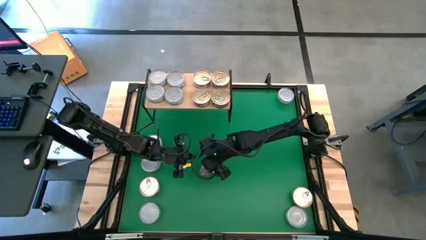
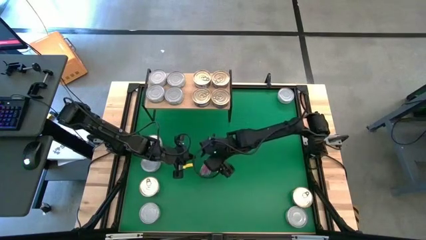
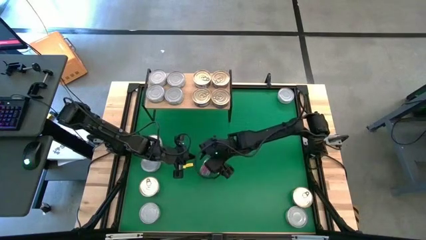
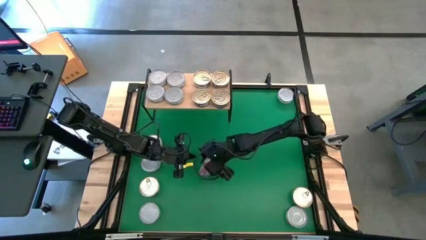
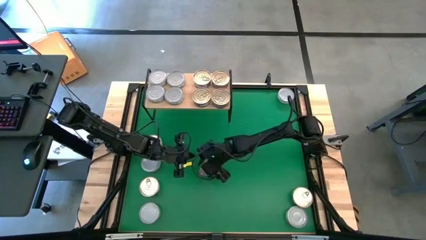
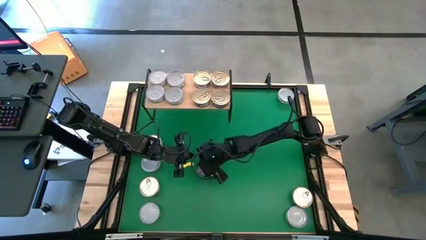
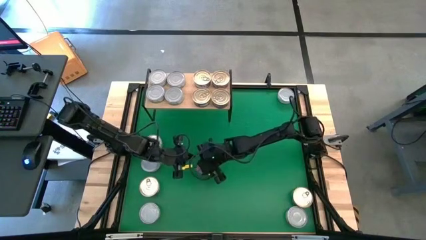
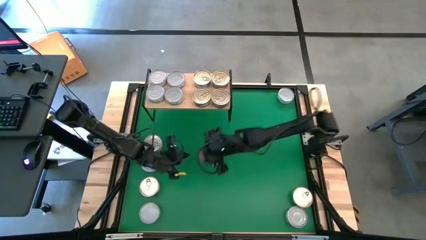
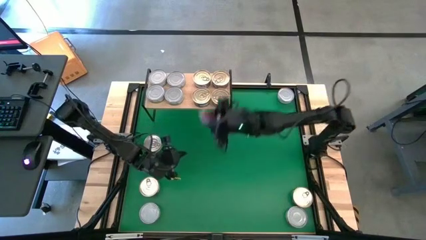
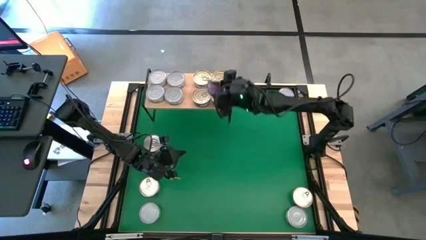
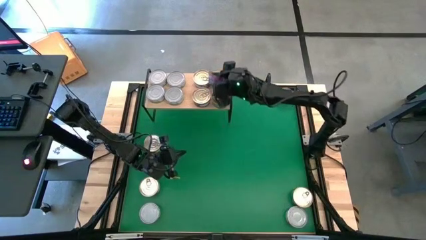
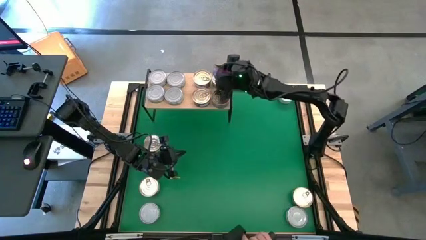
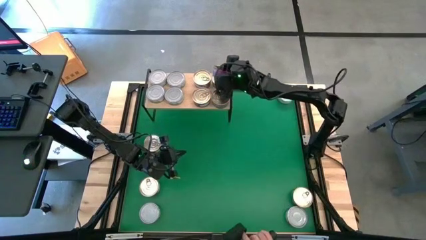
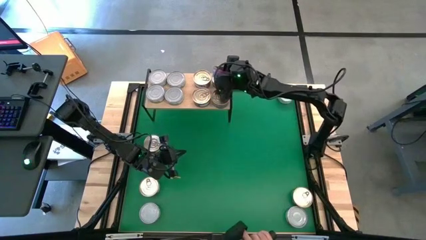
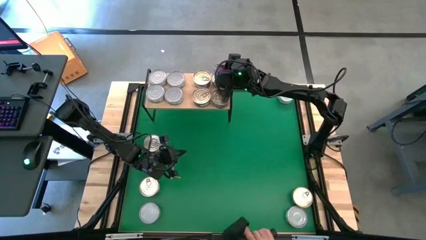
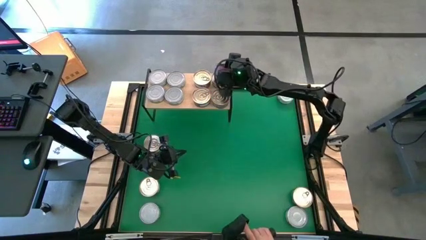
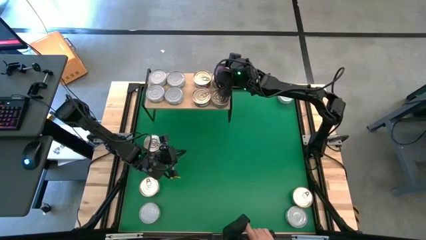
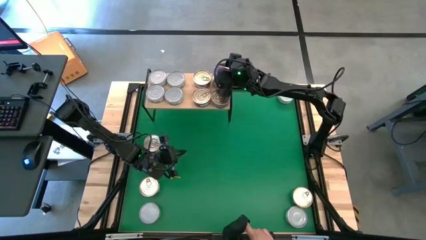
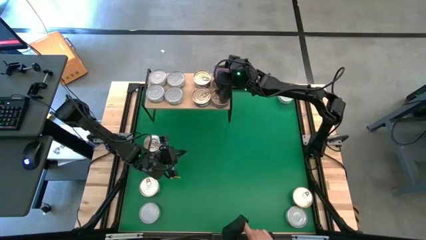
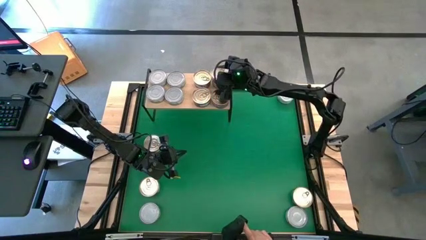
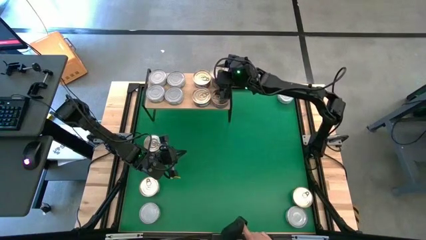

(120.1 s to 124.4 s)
Task: Stack canned seafood by type on shelf
Stack the blue-pink tuna can on top of the other blue-pink tuna can on the shelf

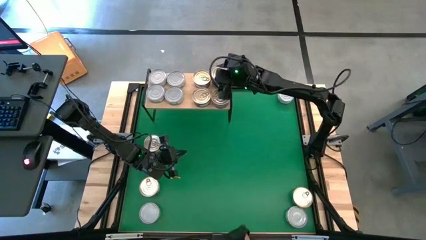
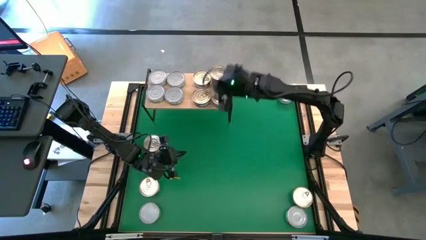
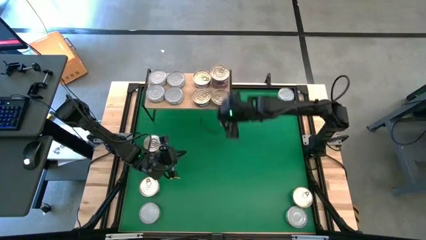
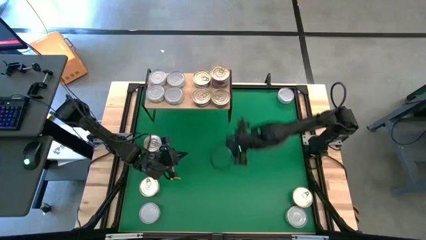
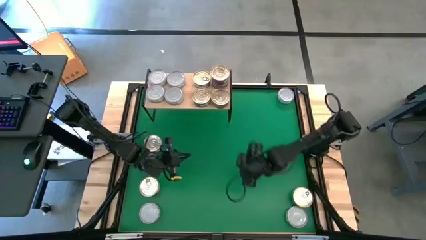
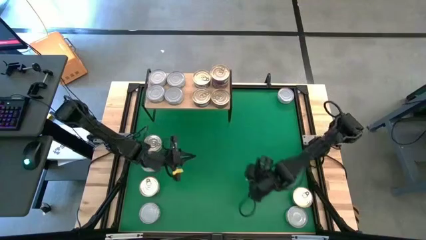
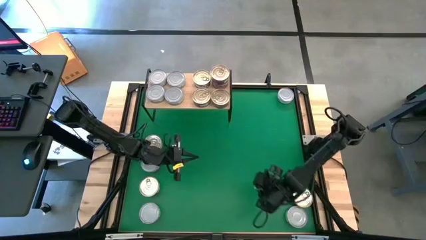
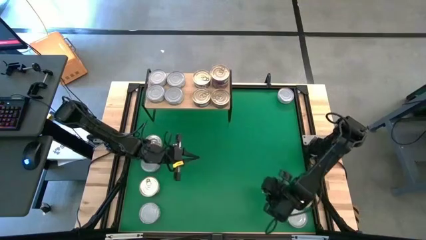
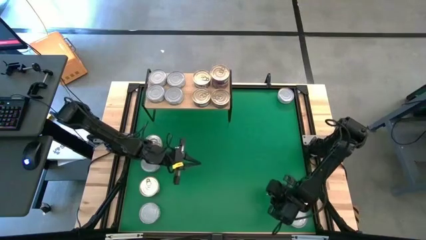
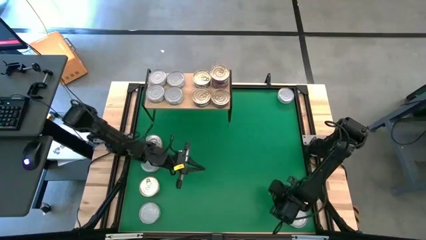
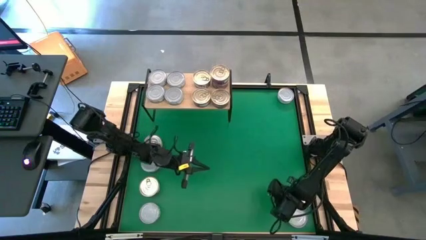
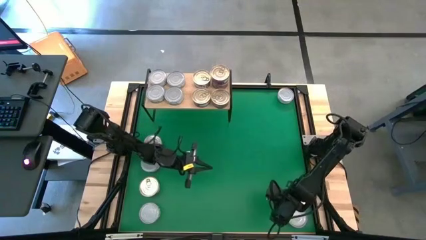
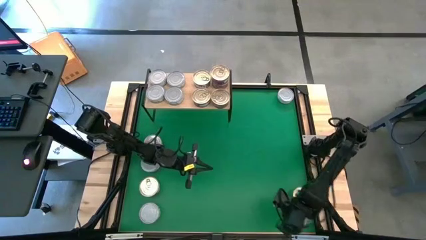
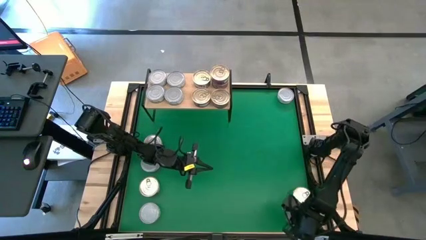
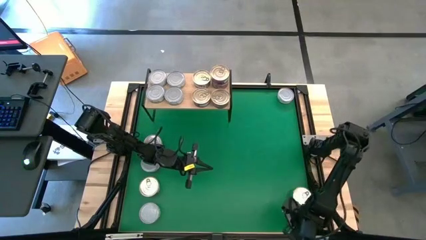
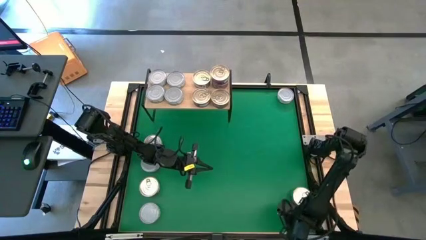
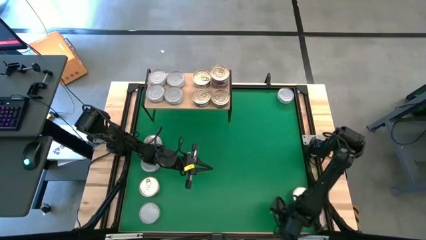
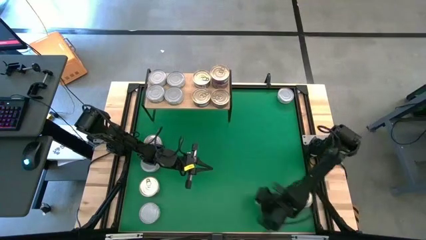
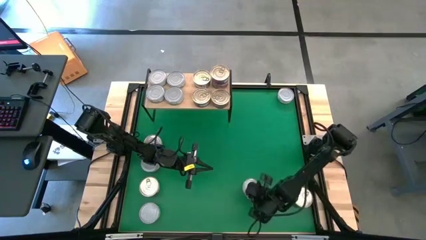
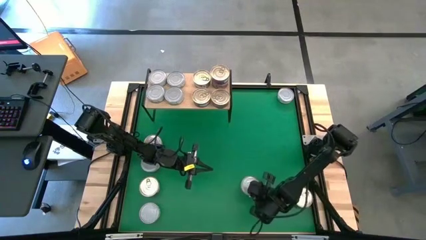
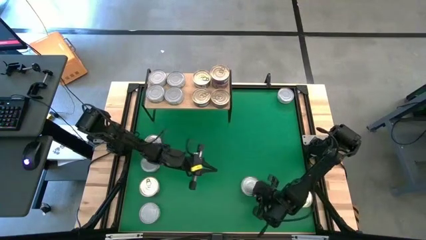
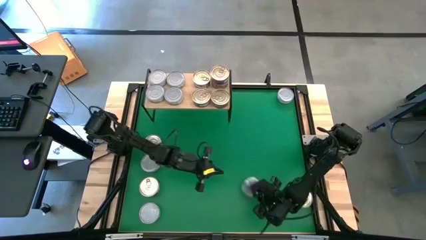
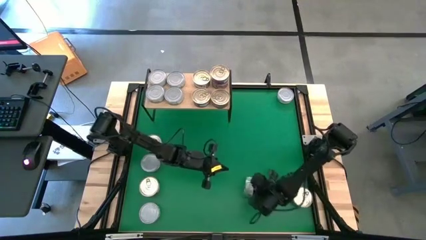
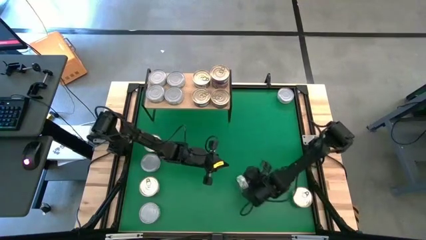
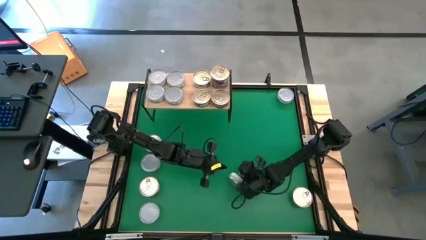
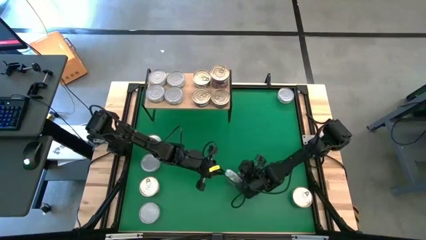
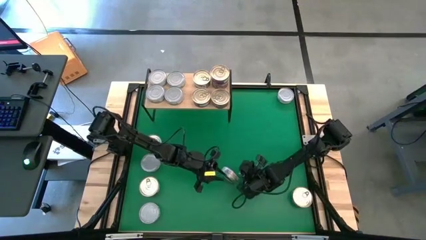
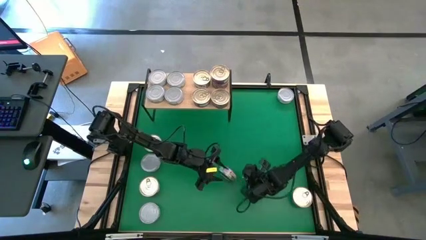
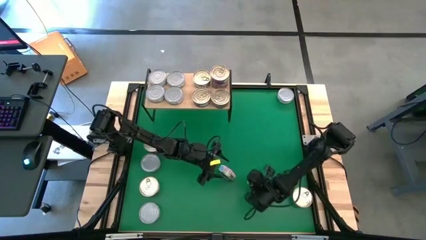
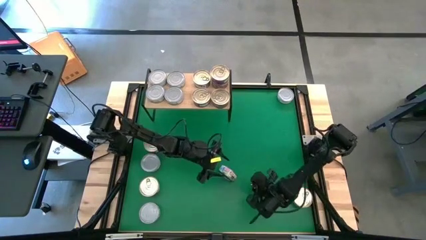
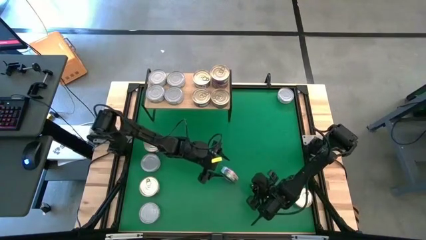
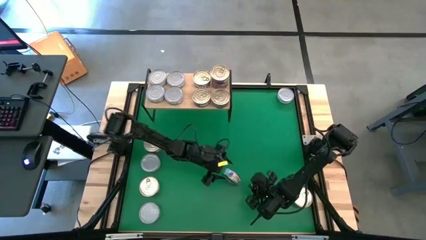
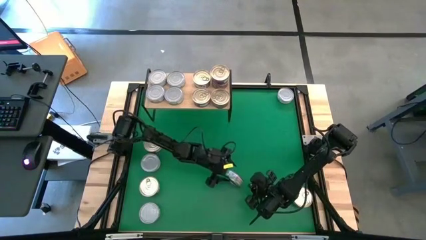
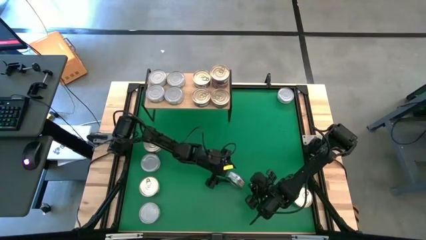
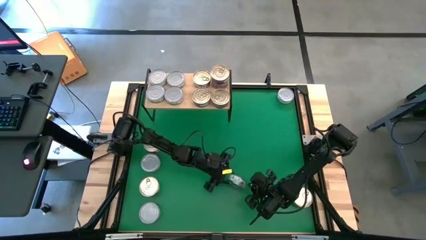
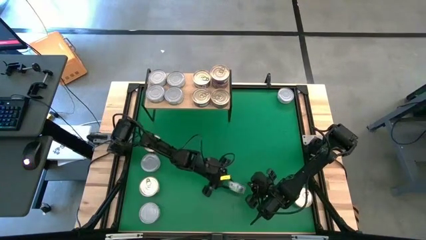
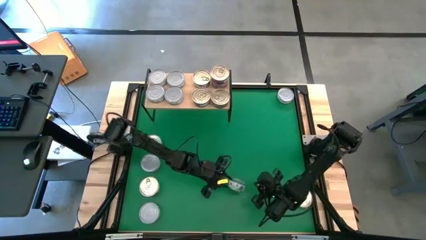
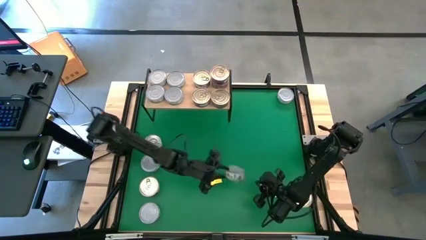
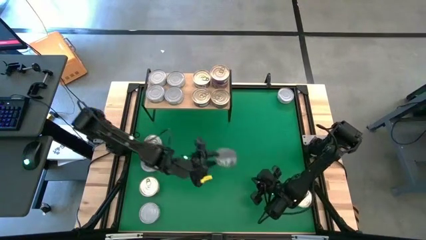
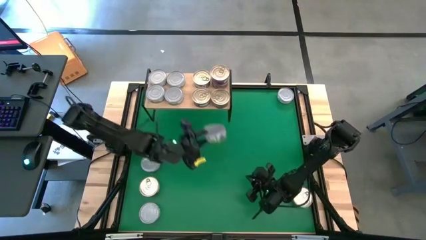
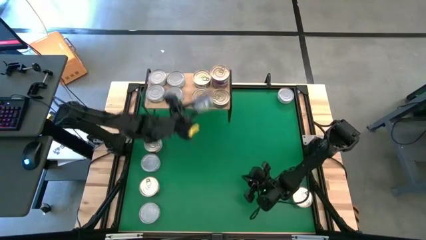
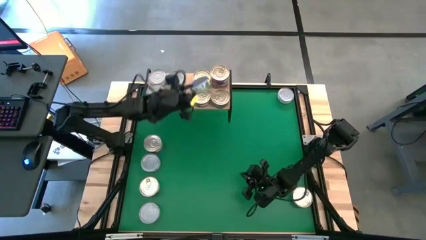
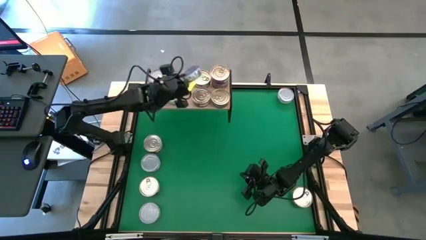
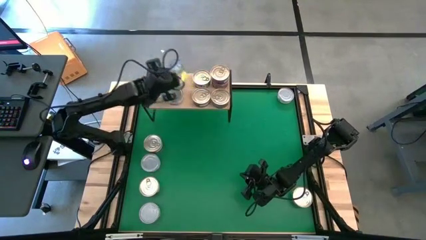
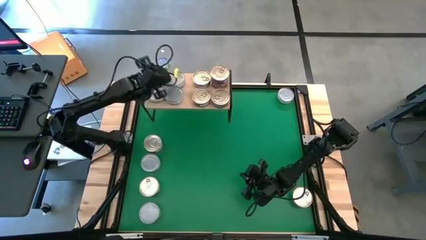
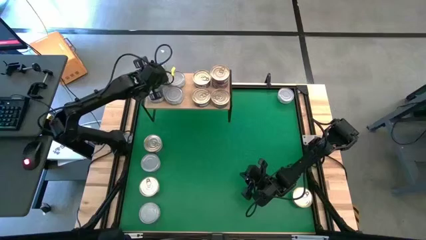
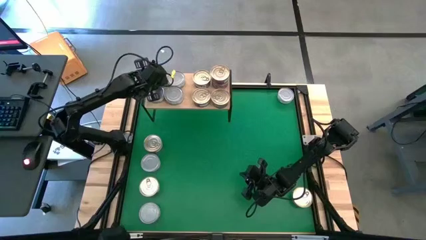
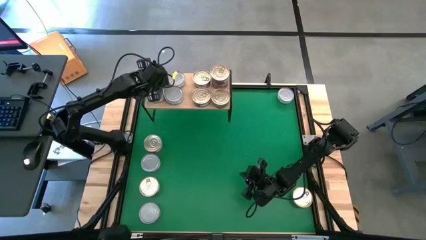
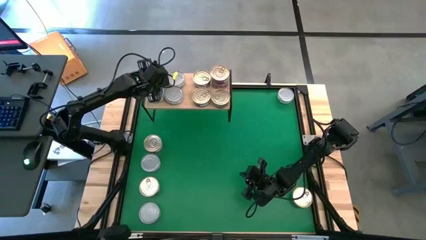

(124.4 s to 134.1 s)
Stack the green tuna can on top of the other green tuna can on the shelf
